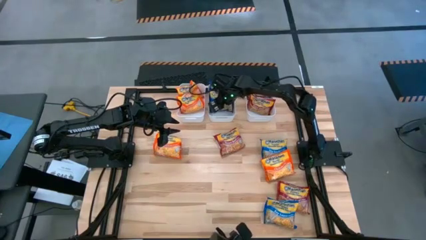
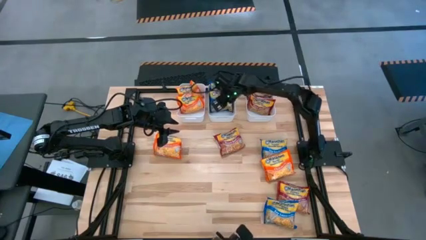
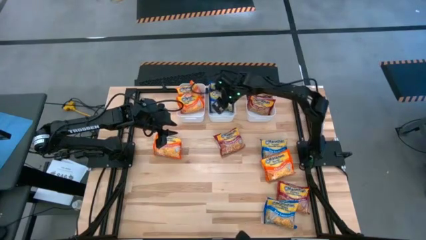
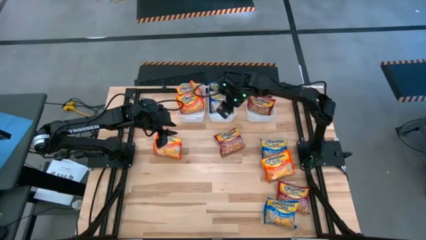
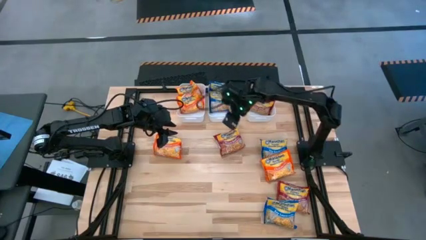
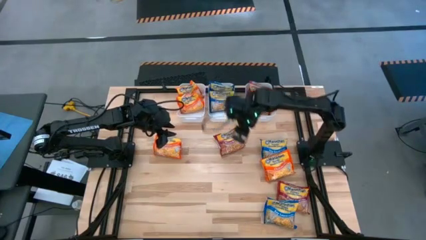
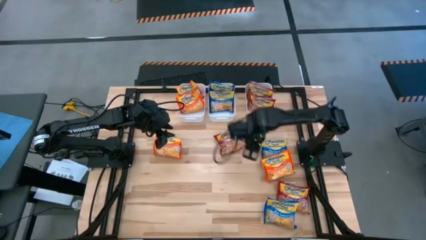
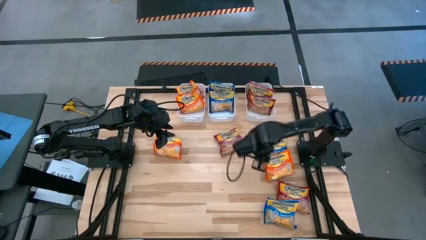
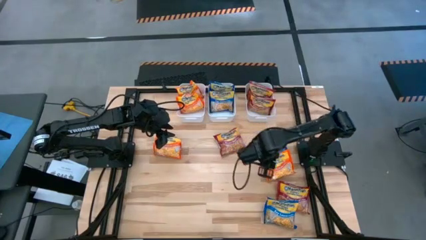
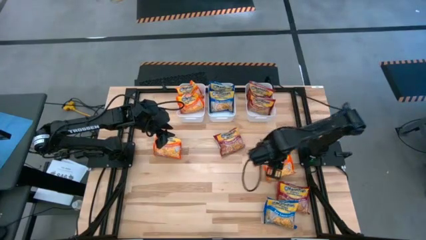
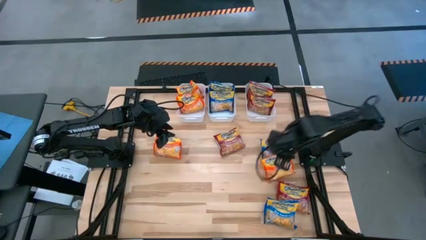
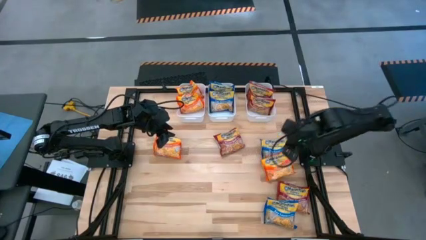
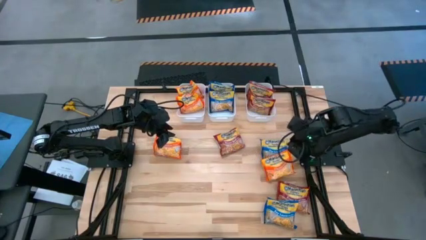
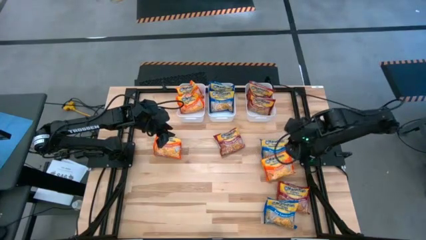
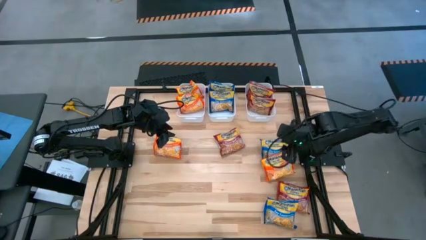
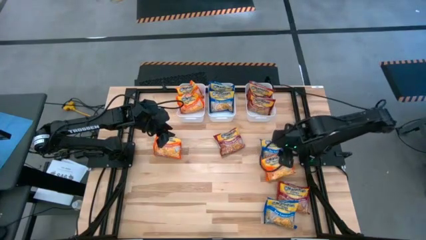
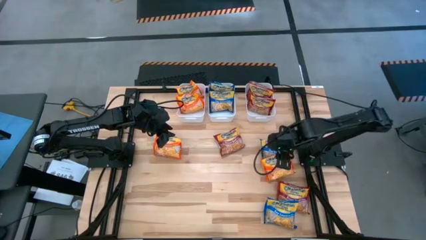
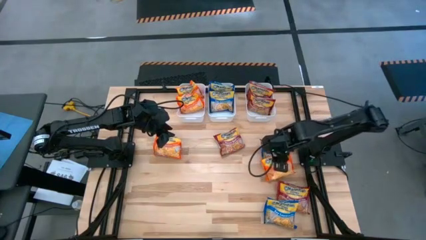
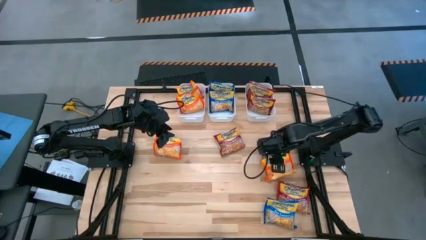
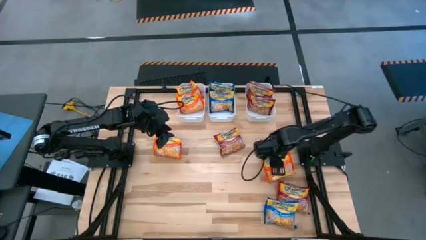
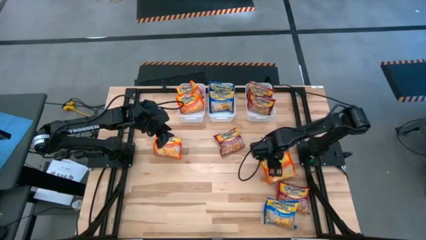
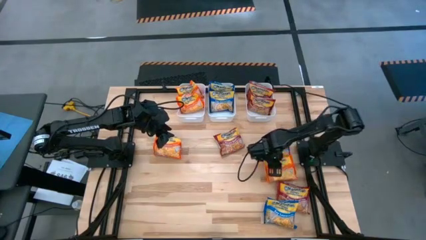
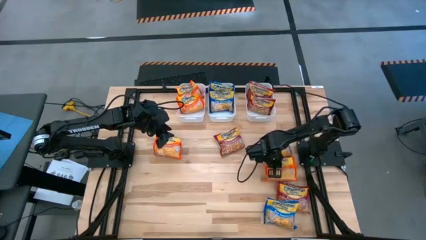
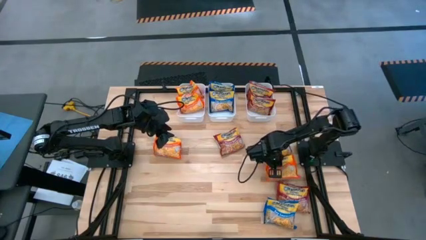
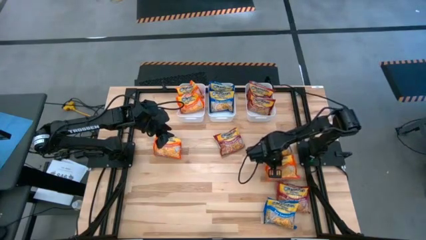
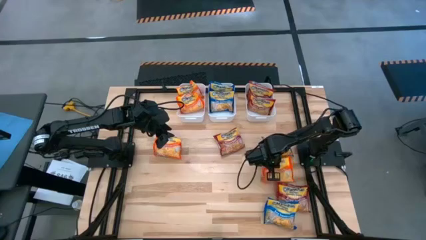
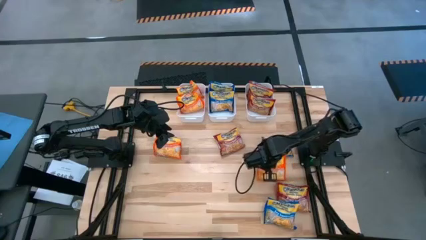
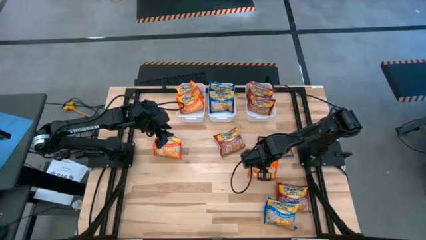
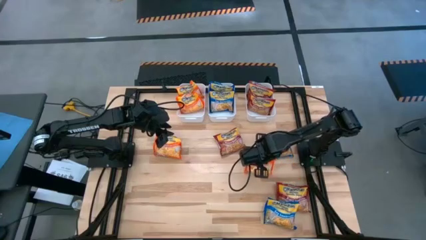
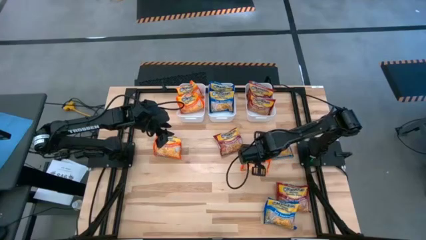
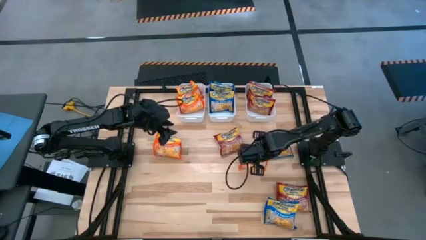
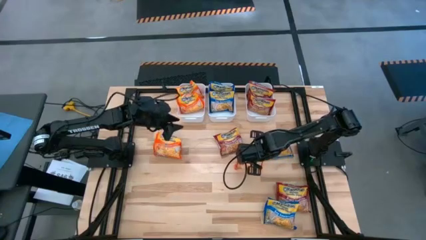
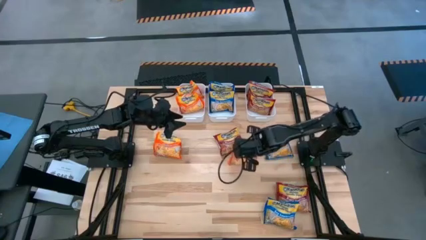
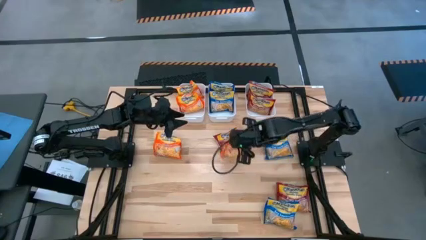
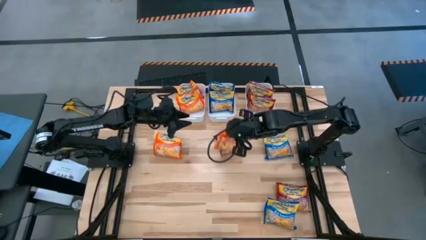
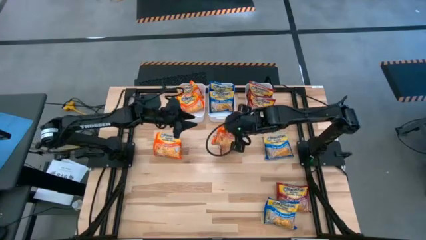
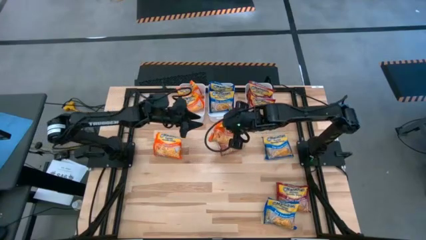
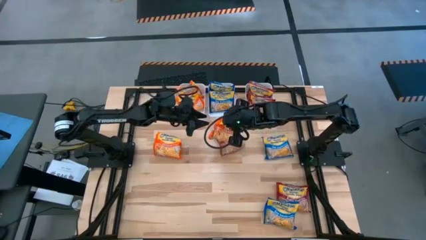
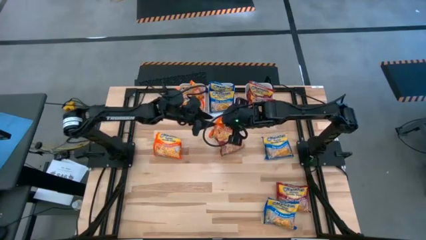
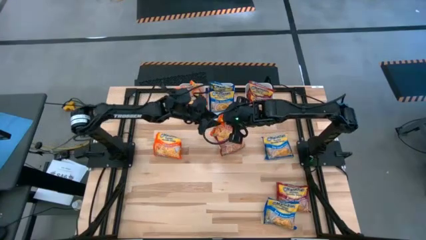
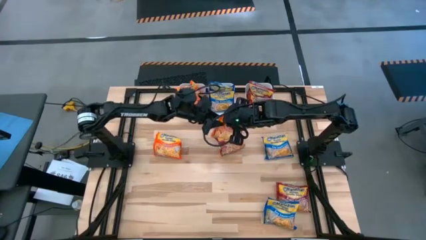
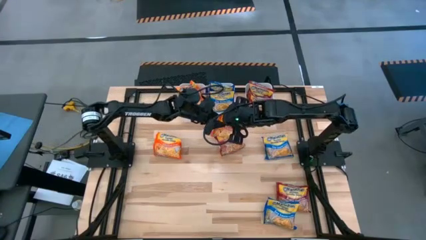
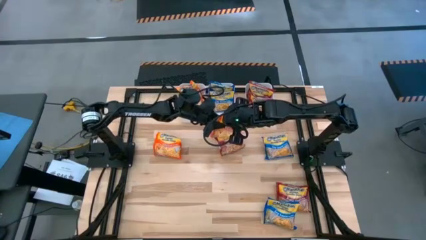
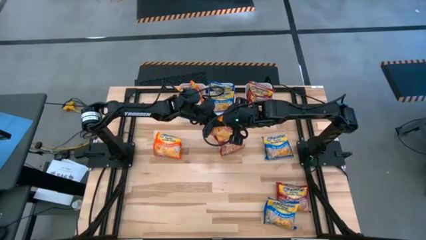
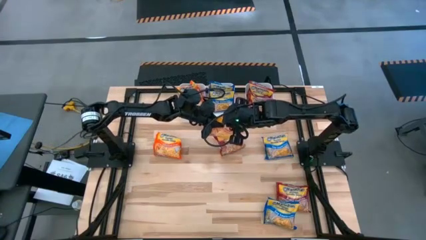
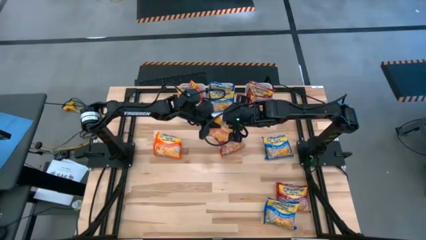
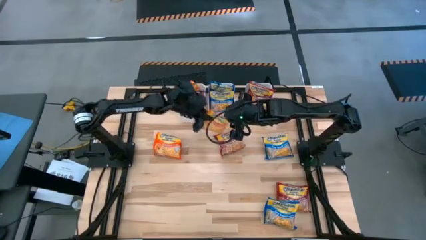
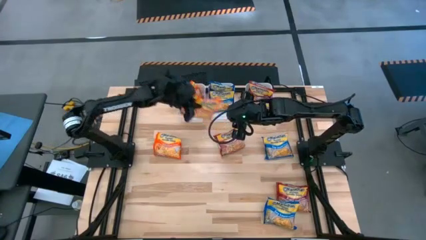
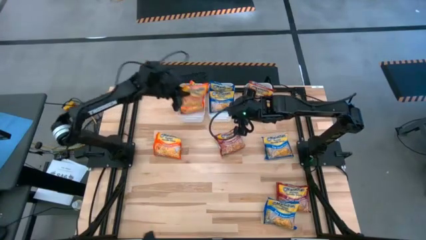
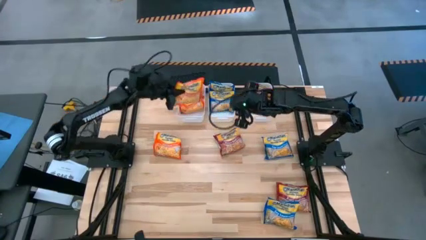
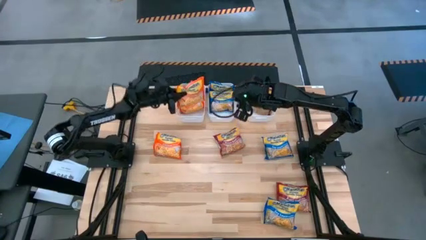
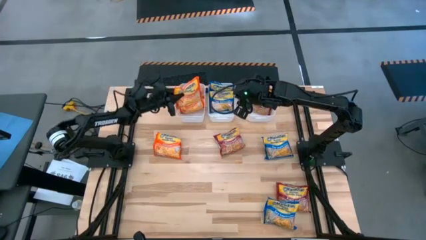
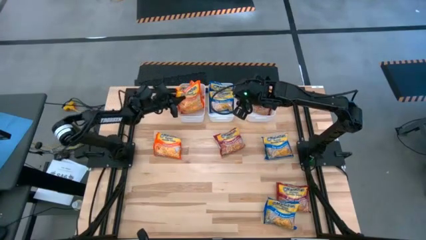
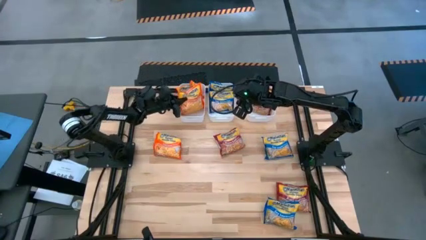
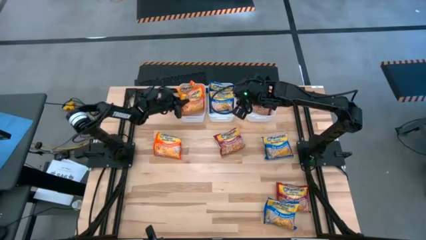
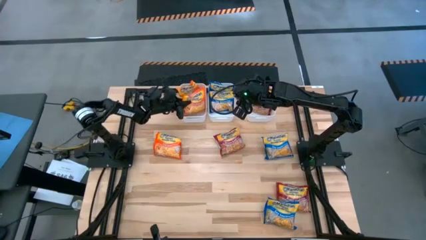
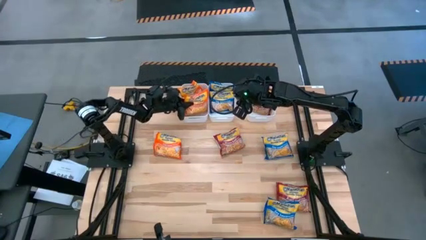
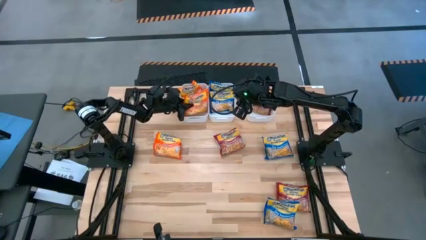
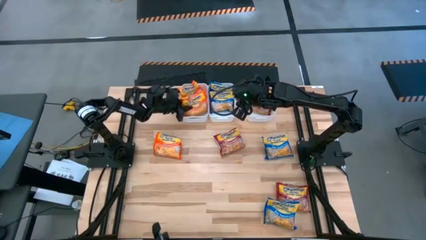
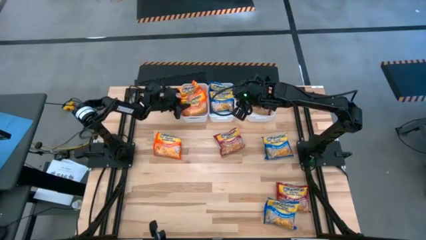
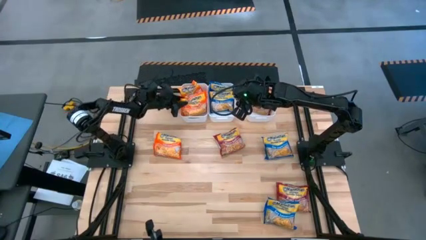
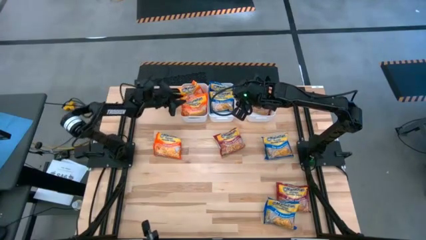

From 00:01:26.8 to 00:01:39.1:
Task: Sort Maruchan noodles
Put the orange noodle pack into the left white bin
